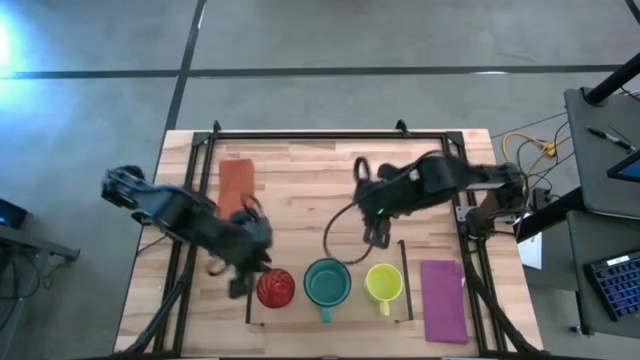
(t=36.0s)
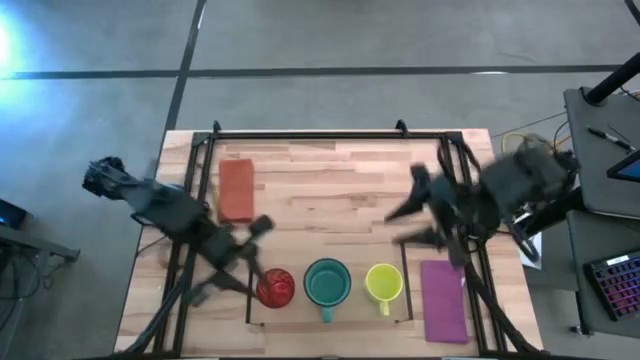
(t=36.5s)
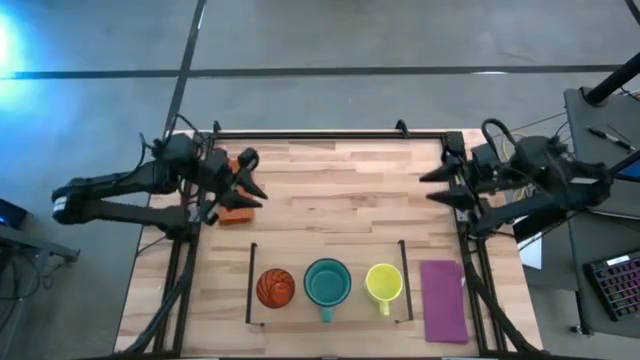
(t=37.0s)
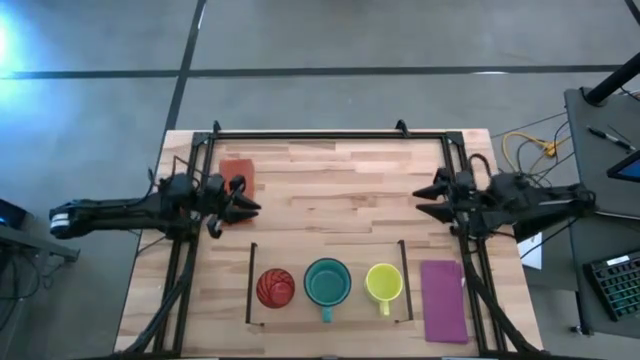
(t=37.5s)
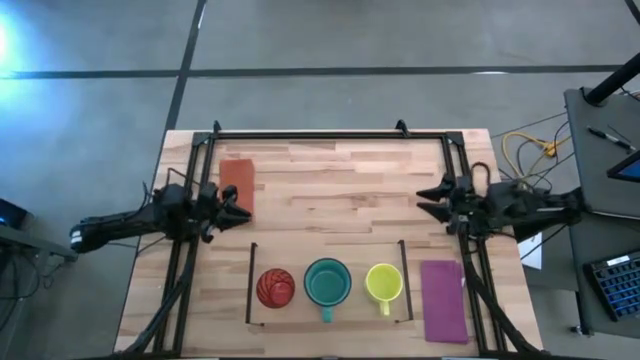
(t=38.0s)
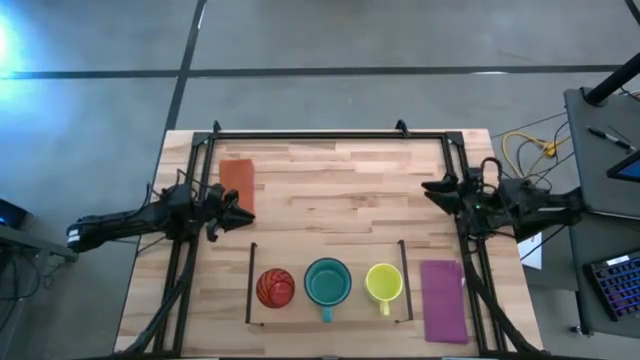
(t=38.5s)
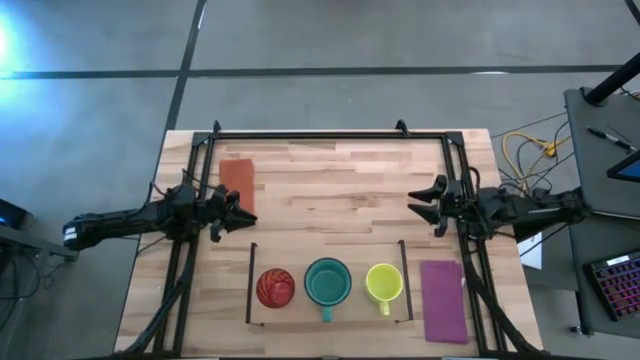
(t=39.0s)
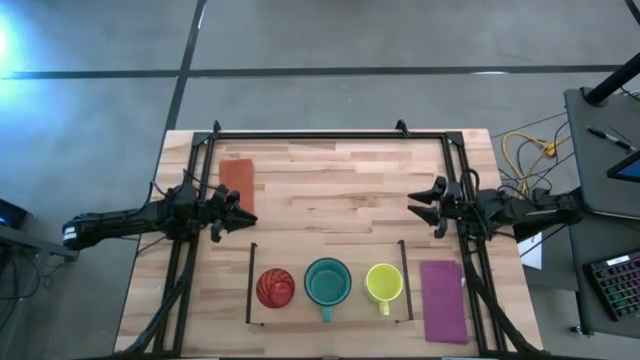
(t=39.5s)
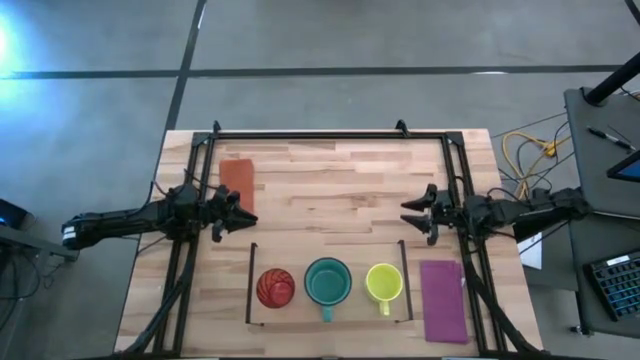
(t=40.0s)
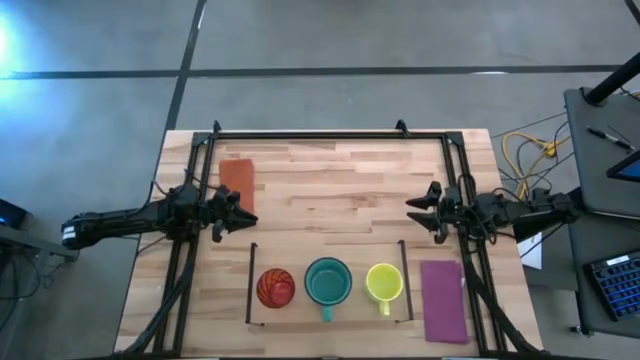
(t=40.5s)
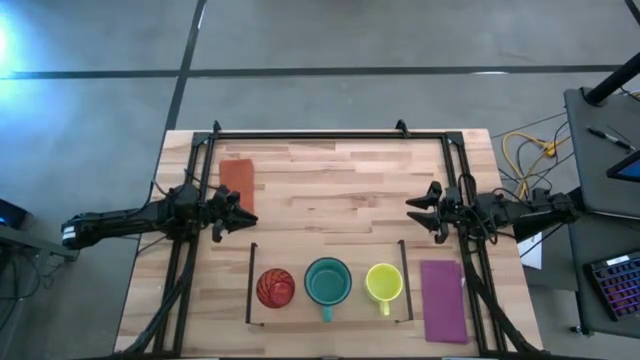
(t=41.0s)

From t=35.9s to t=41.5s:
Task: Stack small to large cups/mugs on shelf
Return to Home Position

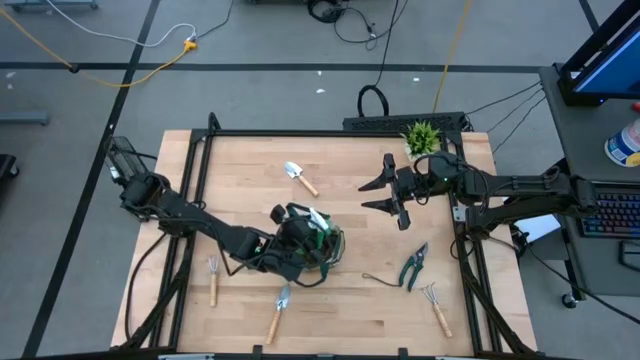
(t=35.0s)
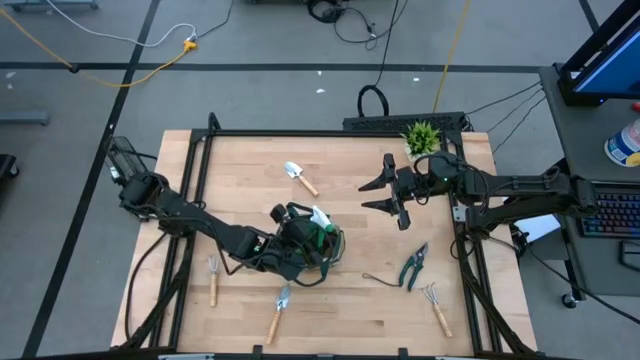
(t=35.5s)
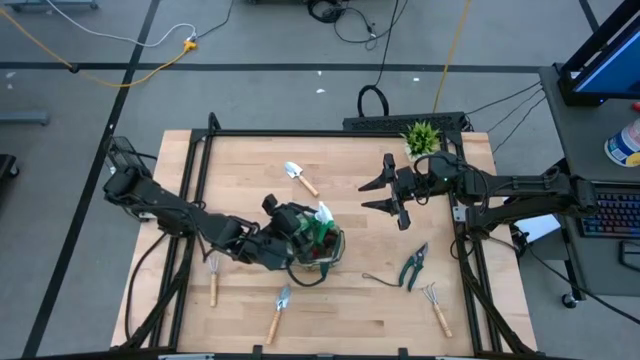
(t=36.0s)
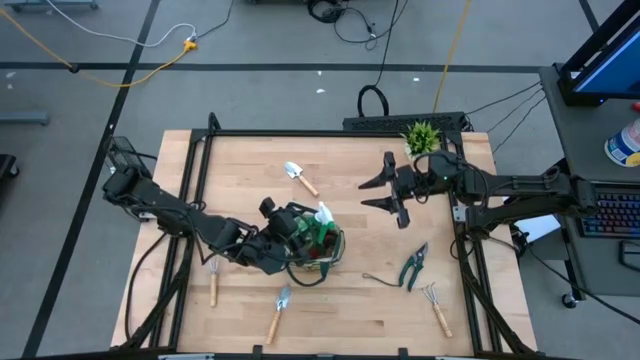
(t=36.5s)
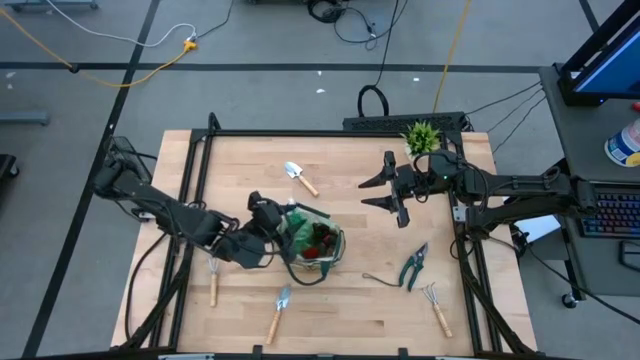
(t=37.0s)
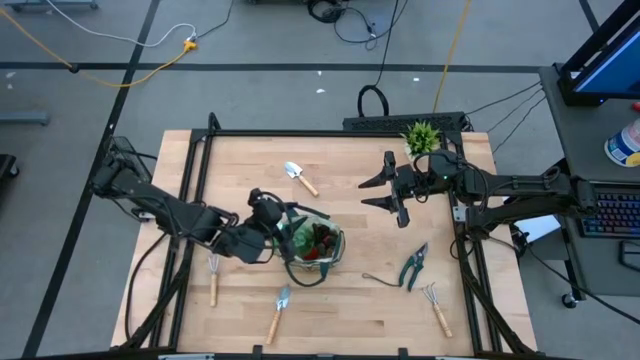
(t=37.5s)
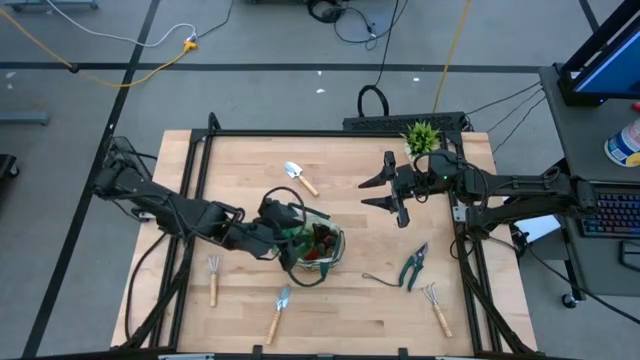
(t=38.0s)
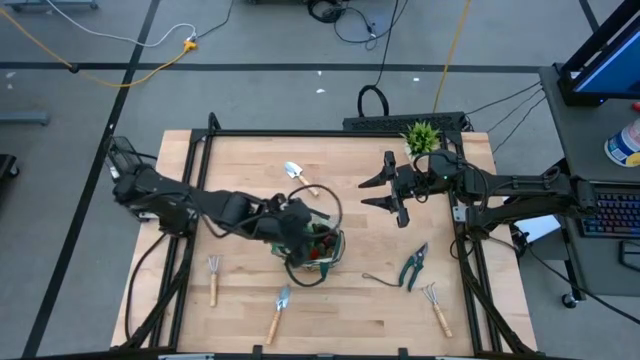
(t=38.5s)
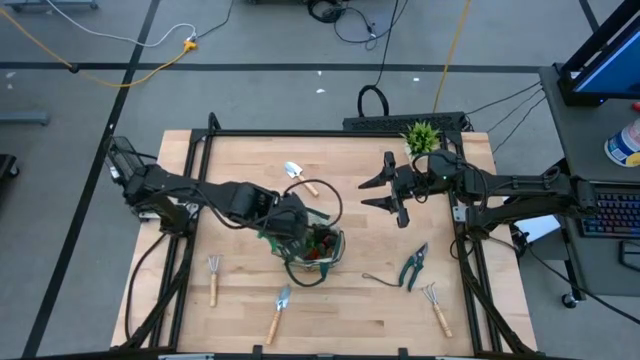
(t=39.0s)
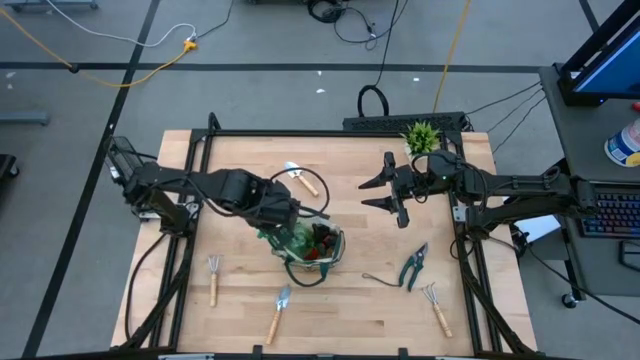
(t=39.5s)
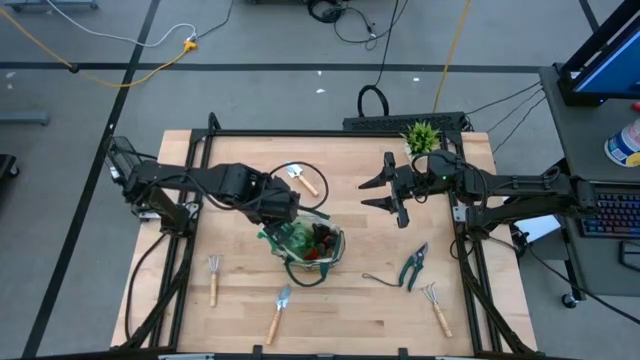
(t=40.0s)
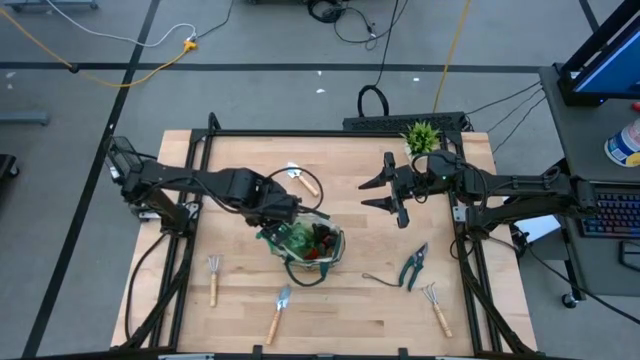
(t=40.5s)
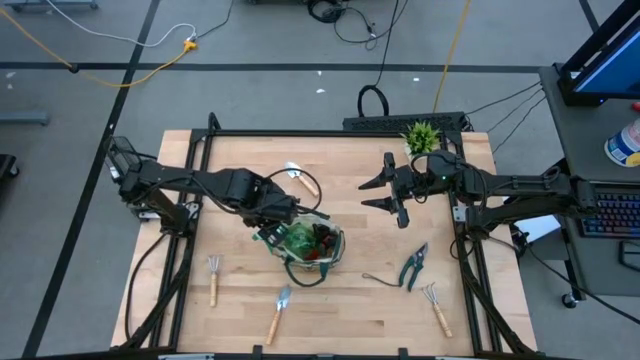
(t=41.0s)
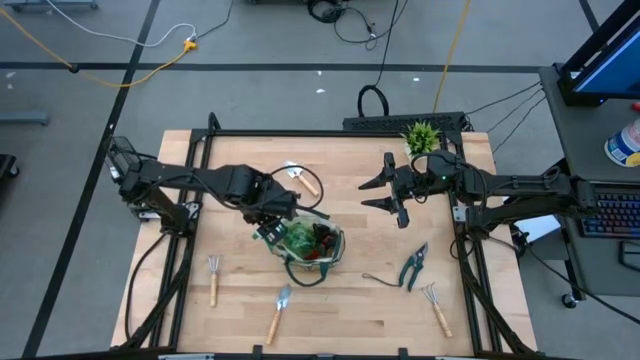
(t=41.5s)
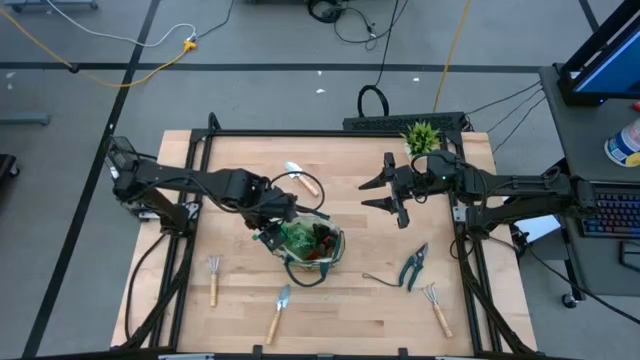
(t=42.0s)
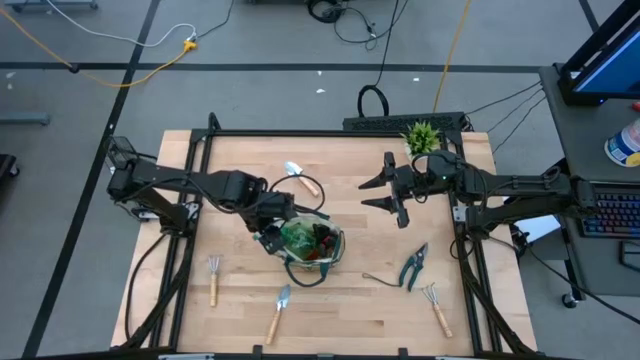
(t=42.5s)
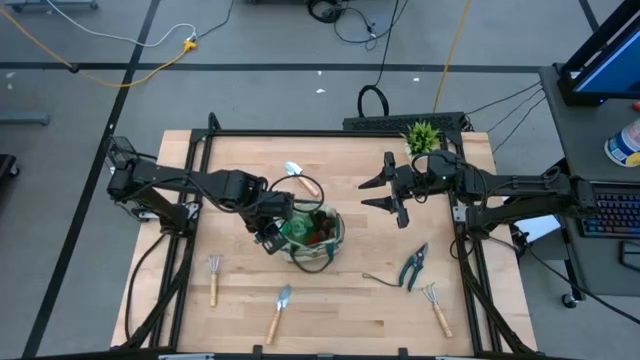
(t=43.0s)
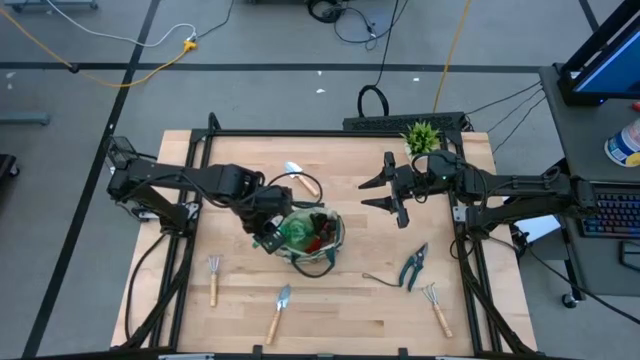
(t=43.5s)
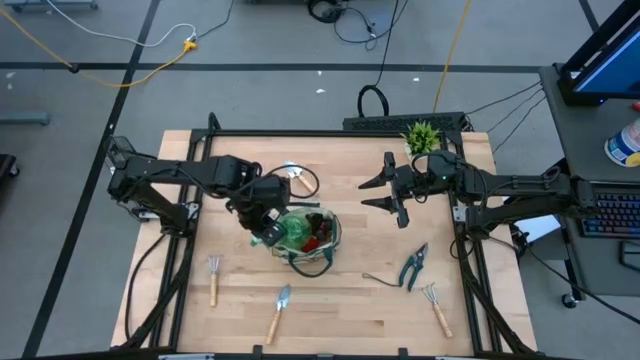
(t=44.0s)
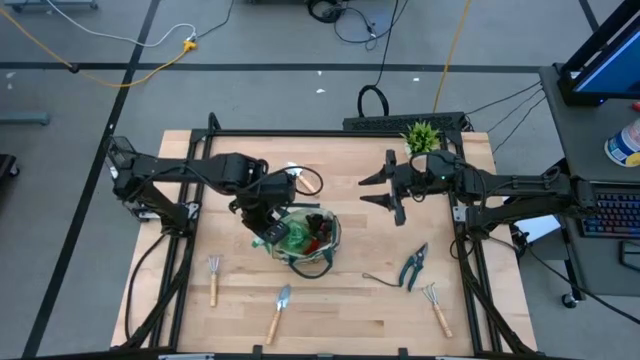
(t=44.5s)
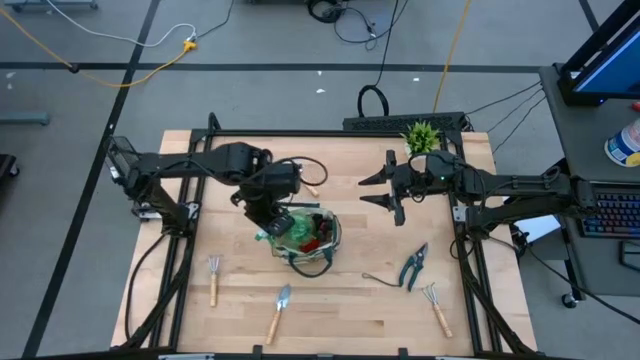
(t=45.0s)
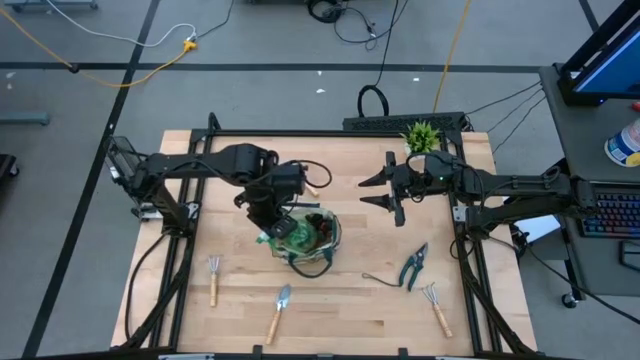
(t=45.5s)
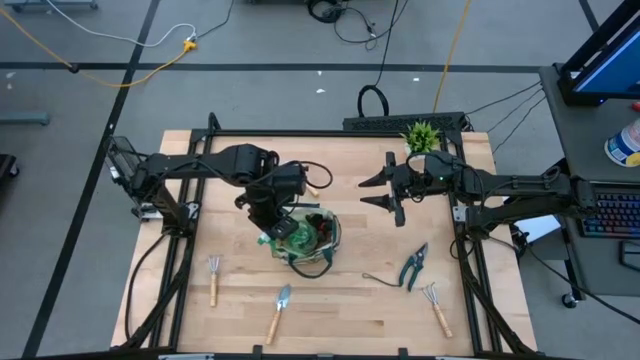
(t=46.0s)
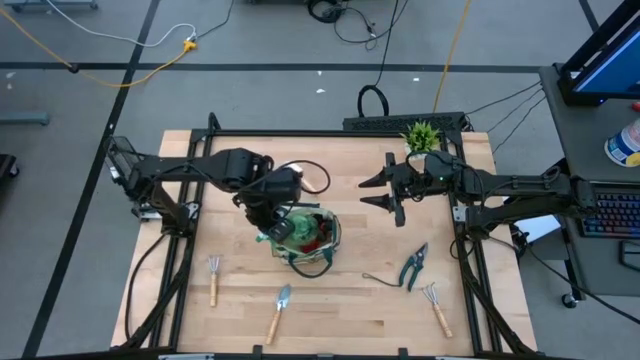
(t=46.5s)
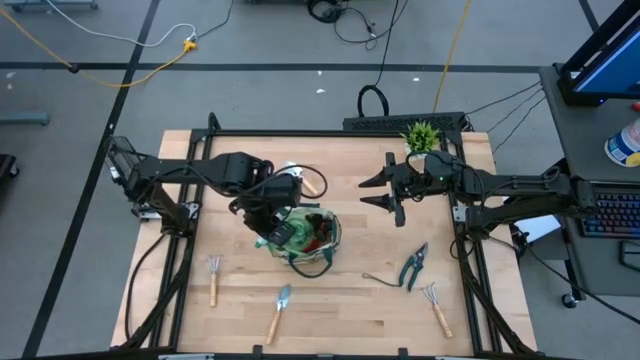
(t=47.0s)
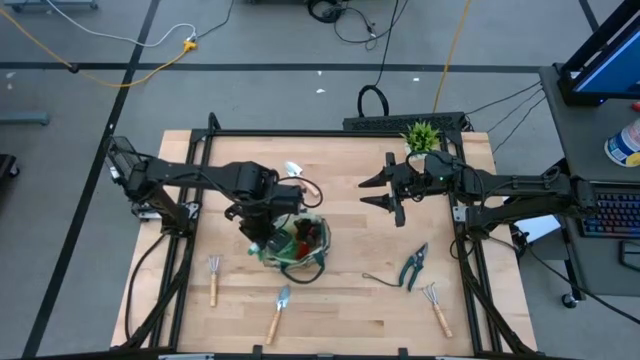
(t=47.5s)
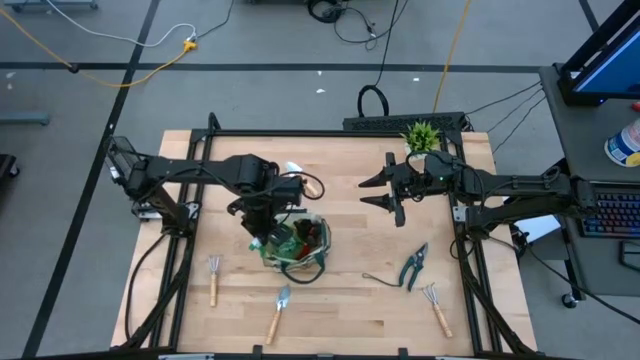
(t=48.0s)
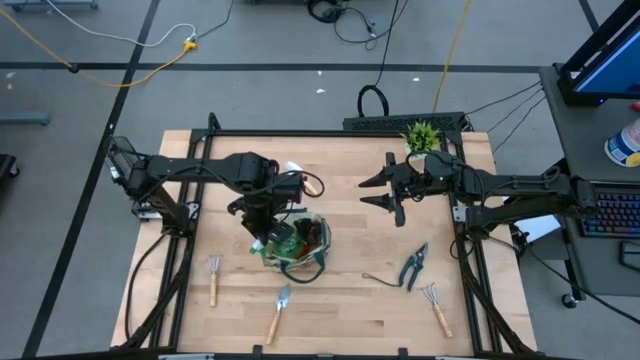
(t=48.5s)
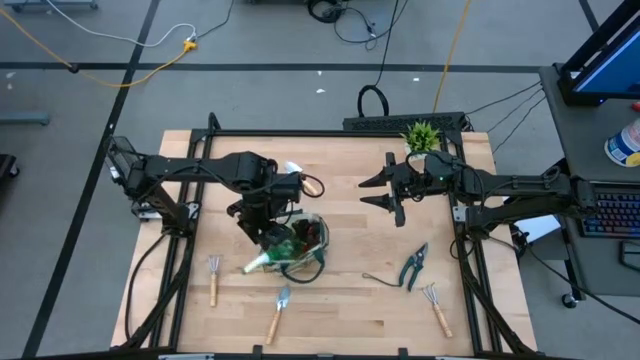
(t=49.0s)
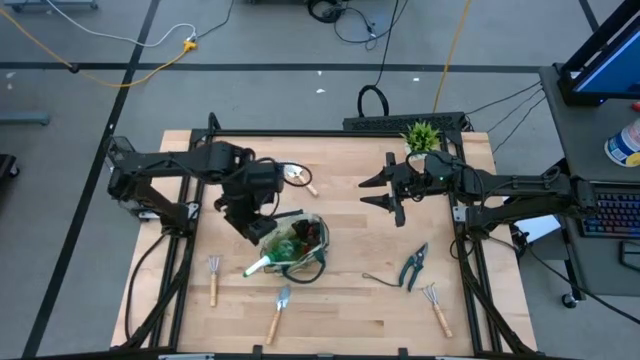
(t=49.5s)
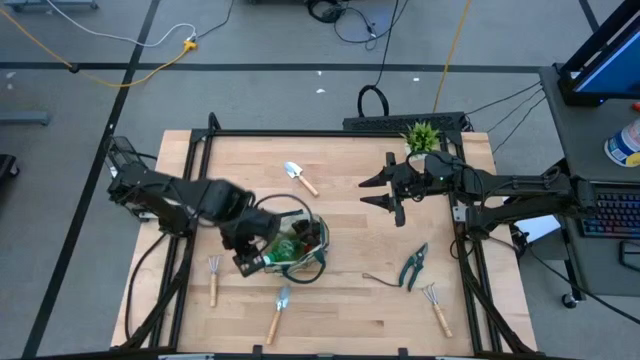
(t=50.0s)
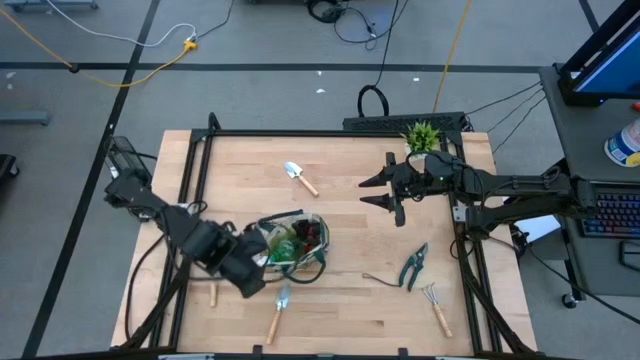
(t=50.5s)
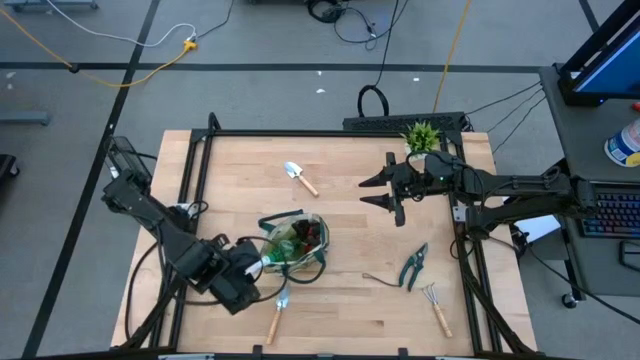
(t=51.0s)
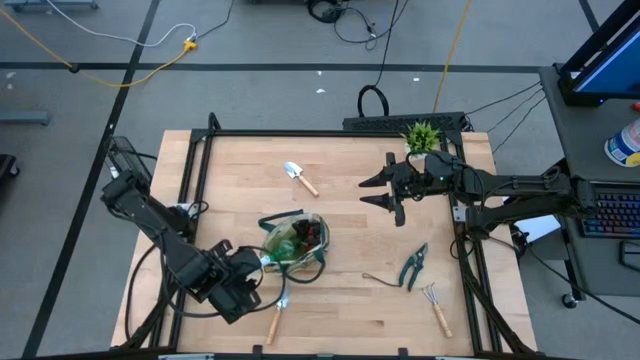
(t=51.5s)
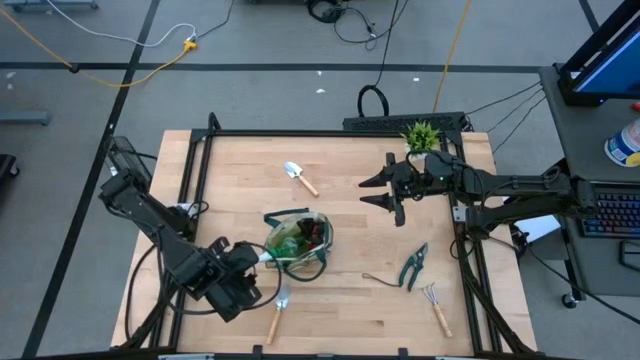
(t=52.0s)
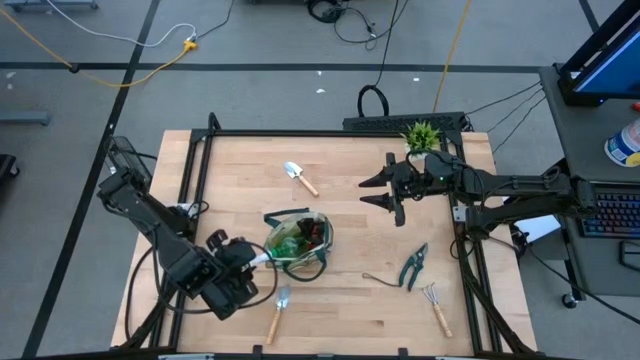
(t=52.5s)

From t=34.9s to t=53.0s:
Task: Pick & Place Garden tools in Gardening bag
Put the spray bottle into the gardening bag
